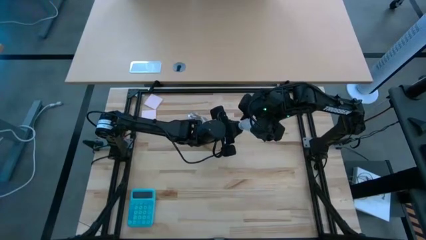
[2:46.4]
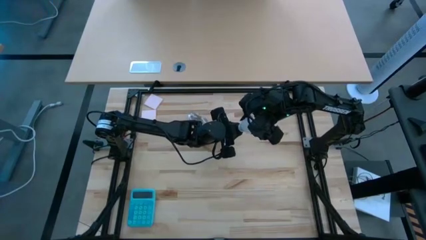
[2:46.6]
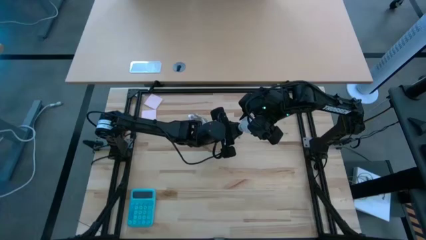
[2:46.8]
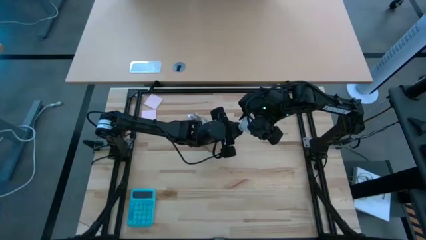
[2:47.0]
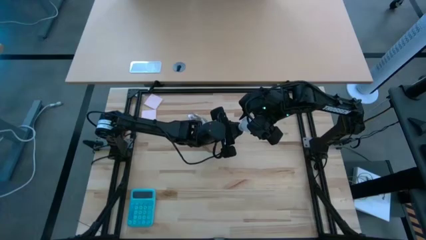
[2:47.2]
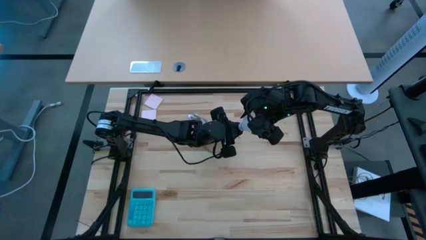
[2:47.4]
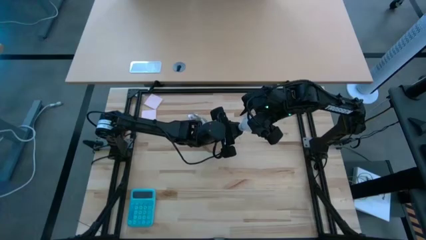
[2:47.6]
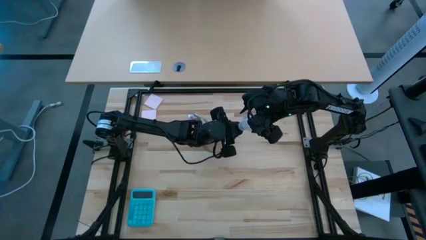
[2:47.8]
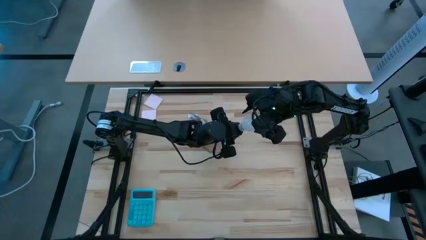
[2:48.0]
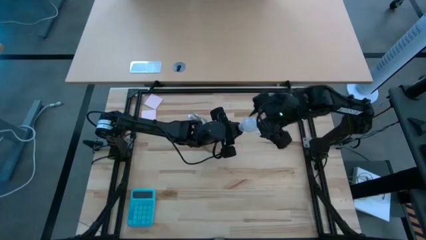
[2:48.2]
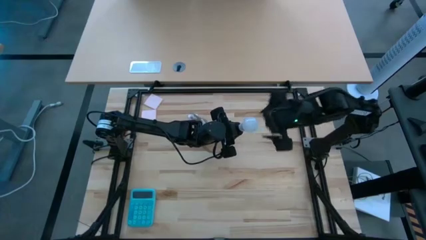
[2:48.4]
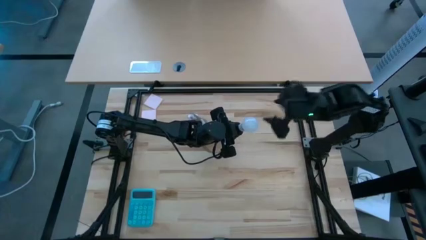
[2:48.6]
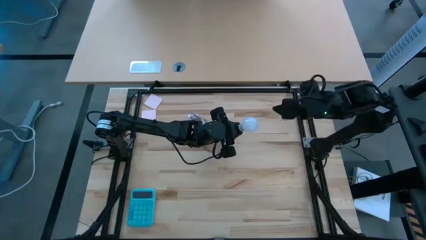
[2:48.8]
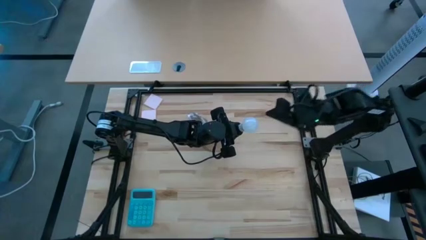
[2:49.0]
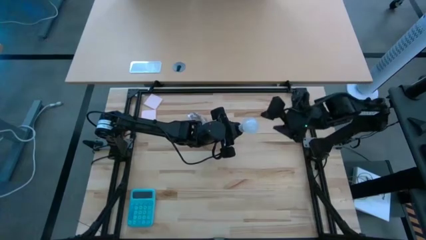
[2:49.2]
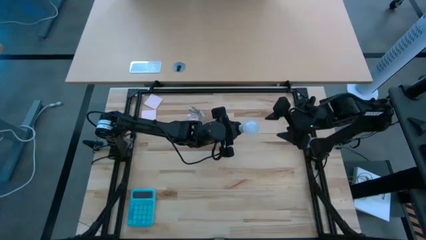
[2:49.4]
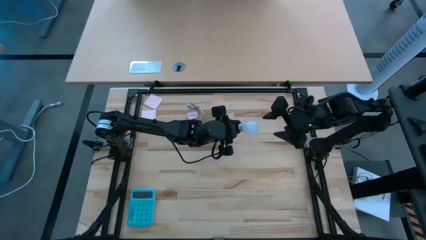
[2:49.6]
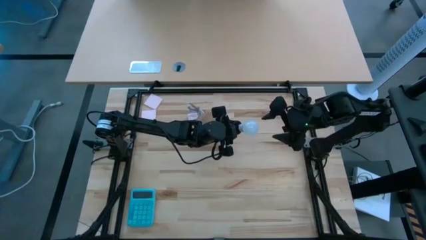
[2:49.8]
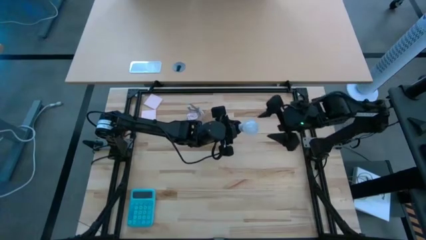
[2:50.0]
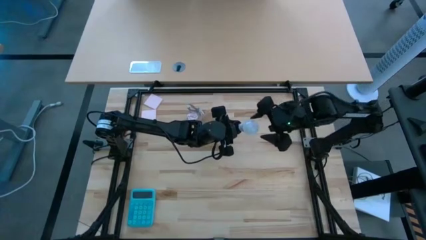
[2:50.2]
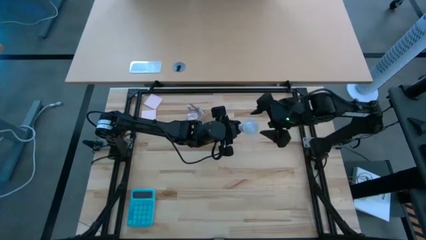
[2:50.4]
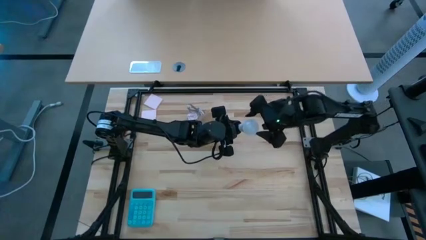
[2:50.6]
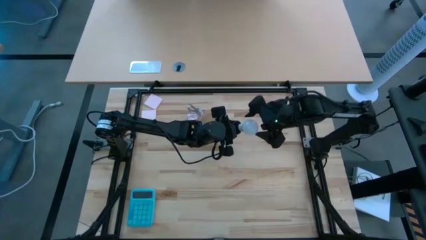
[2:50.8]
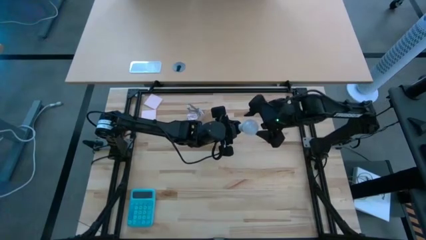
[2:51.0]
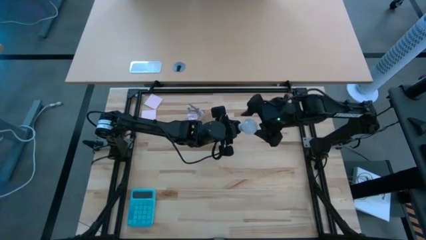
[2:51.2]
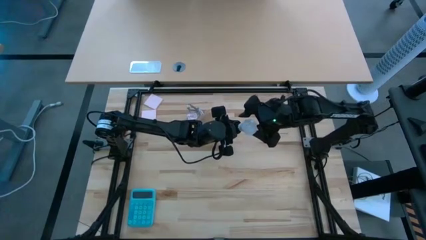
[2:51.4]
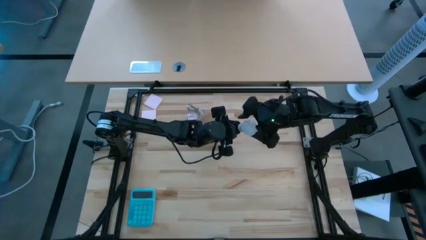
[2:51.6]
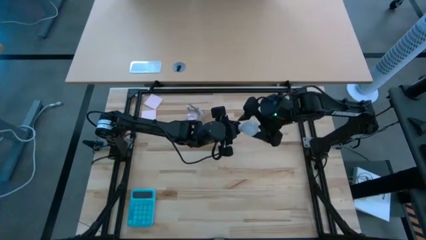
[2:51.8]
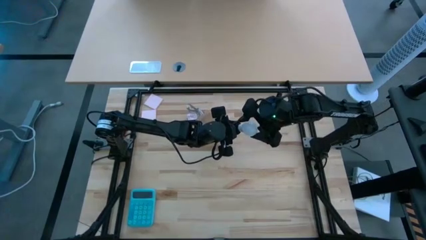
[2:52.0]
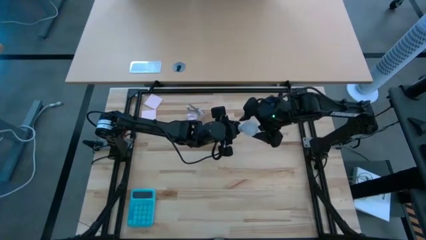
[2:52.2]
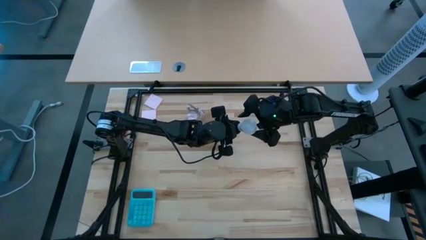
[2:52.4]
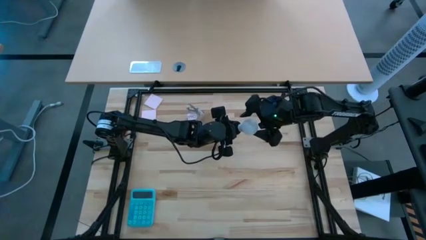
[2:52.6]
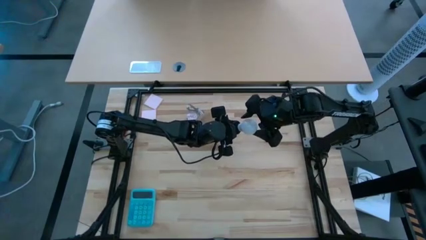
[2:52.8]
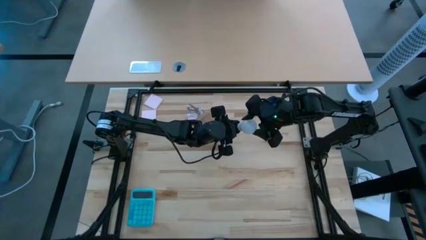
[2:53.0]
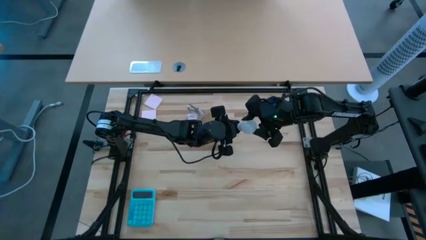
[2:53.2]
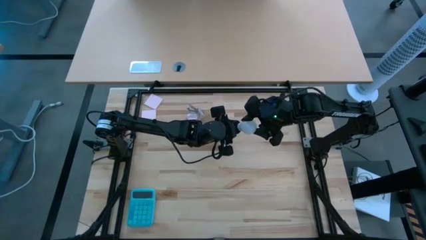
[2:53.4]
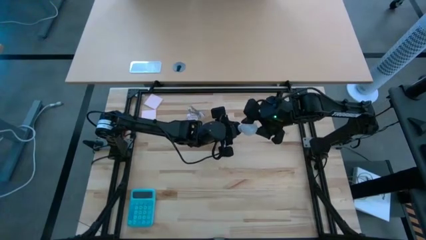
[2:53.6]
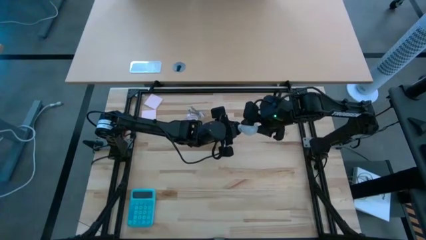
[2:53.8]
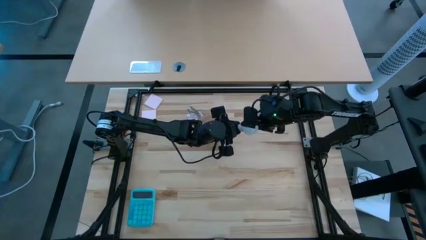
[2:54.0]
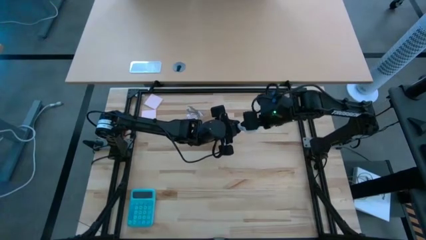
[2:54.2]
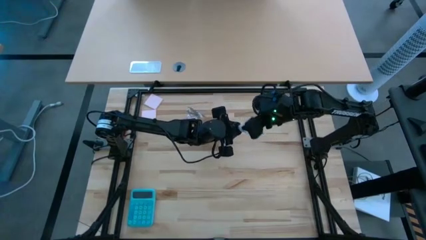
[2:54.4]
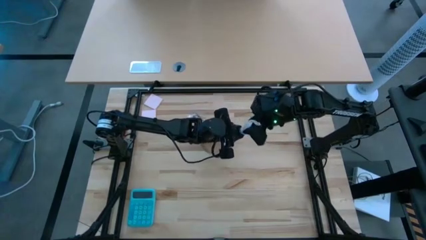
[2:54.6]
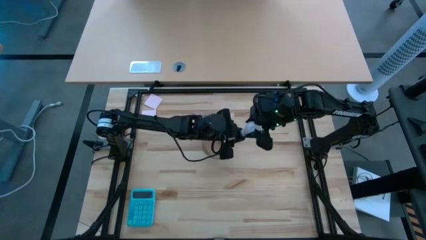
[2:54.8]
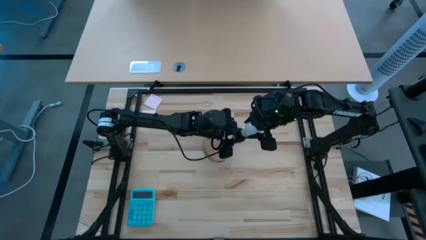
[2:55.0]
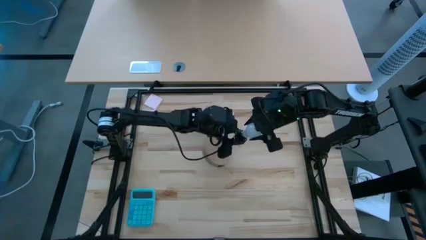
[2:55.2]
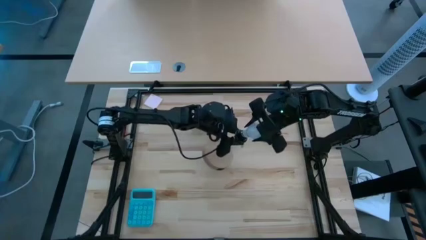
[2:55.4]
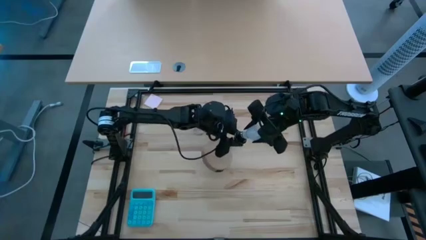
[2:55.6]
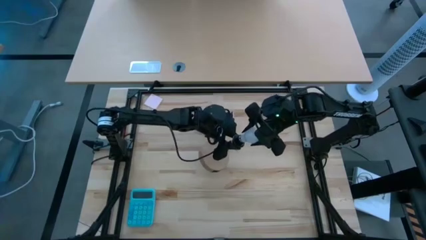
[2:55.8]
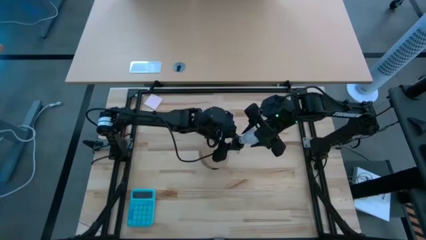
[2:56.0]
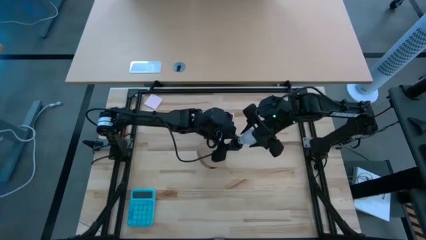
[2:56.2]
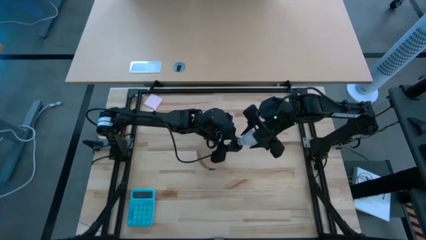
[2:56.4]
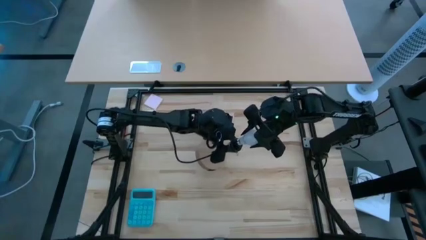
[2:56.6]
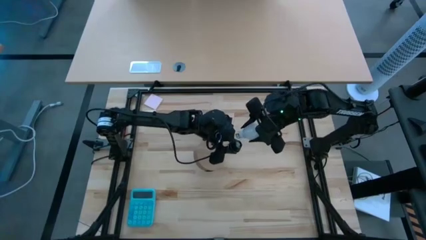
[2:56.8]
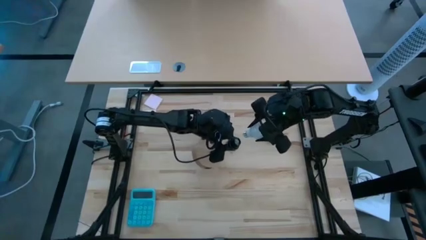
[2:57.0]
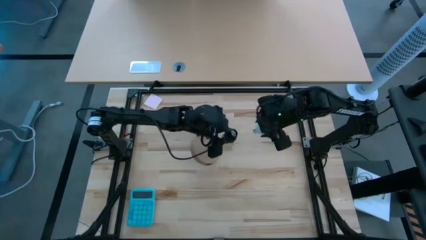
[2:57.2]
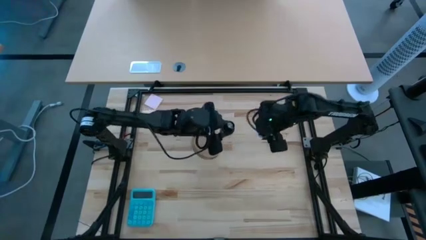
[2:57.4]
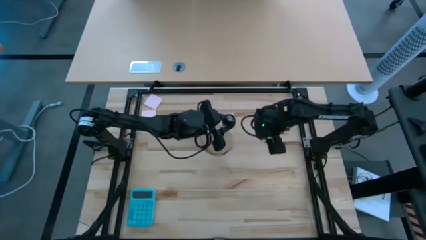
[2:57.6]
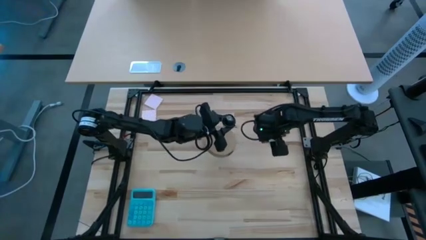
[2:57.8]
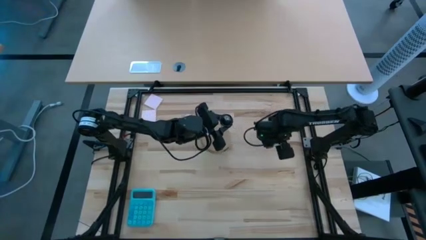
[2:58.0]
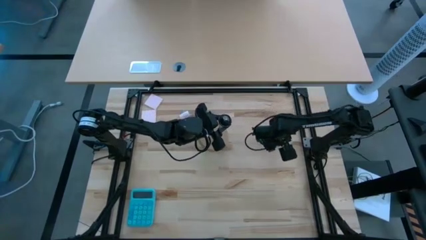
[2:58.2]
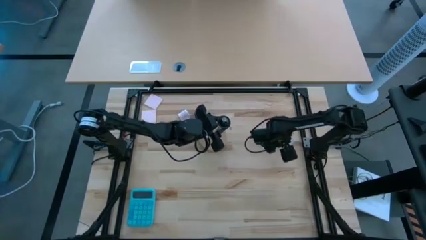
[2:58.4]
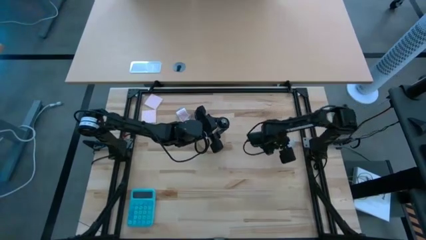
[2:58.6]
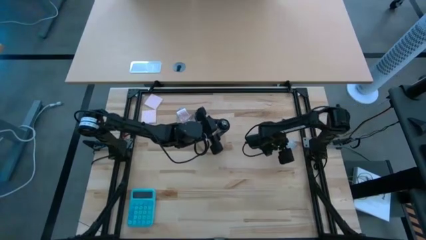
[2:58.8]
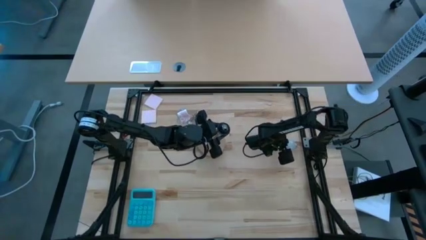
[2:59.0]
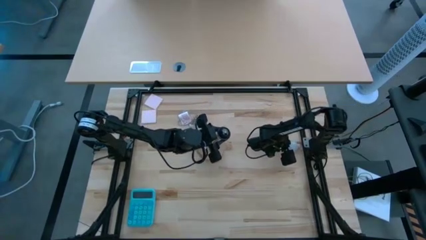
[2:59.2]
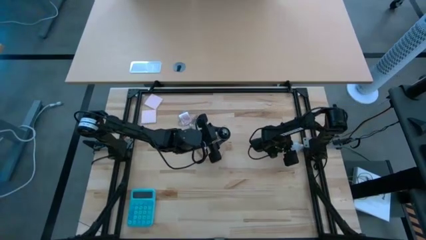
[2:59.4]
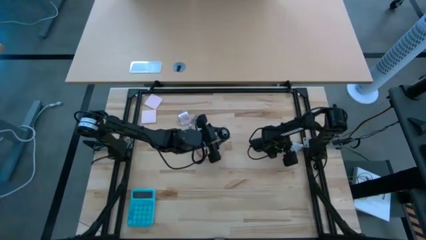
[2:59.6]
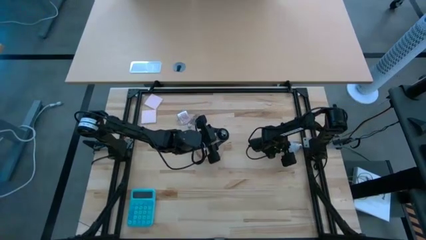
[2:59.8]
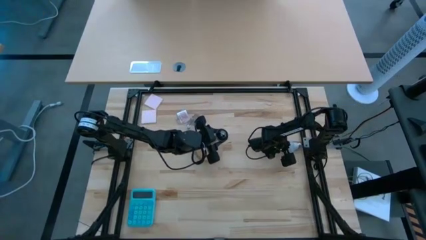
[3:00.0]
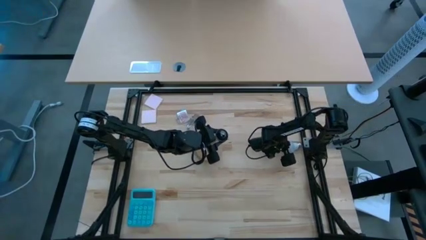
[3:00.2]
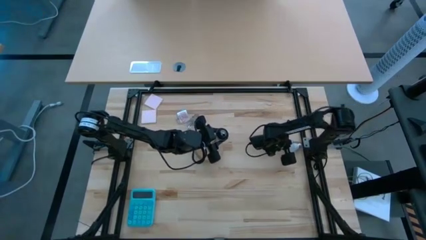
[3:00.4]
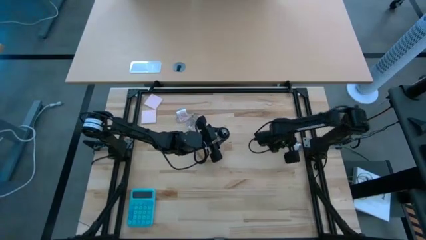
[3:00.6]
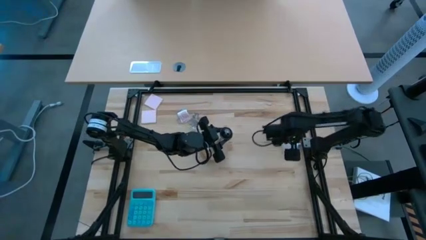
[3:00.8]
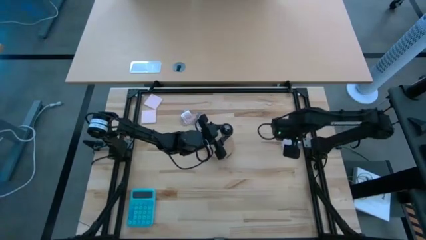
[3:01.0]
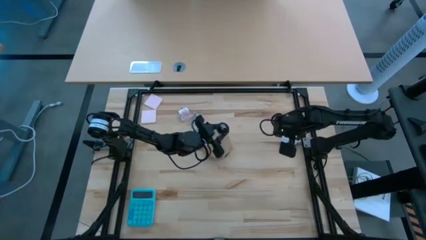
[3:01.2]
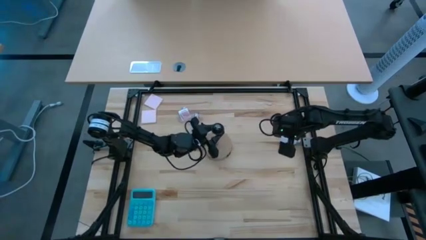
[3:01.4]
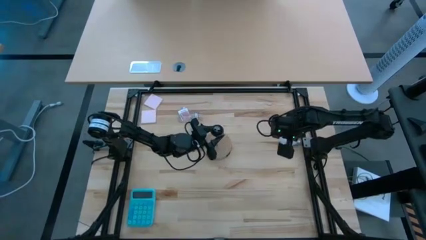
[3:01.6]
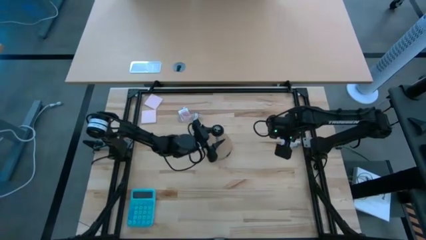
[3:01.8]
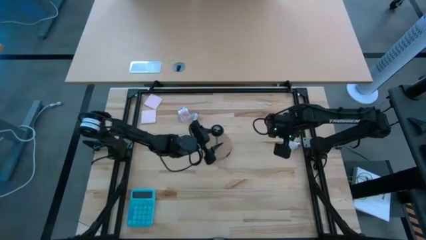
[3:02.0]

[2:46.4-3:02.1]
Task: Screw lightbulb
Remove the light bulb from the lamp
